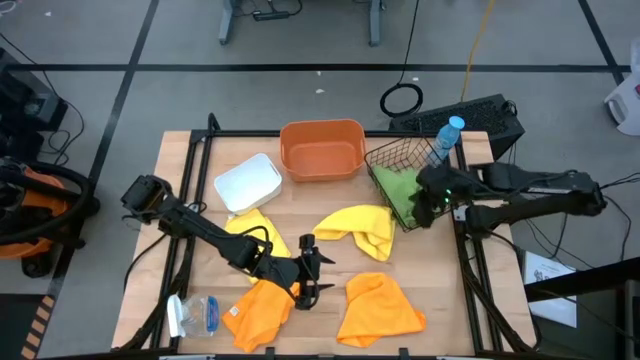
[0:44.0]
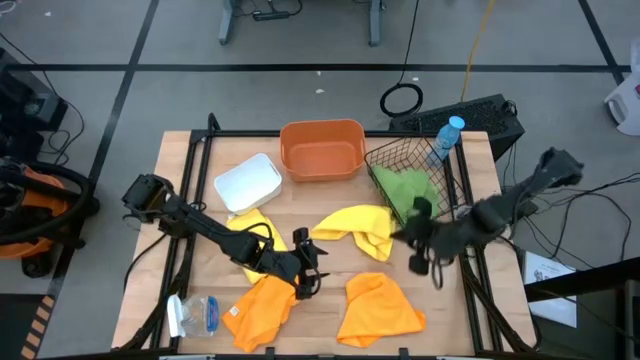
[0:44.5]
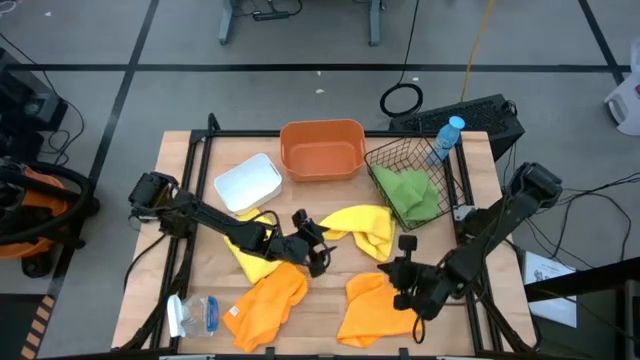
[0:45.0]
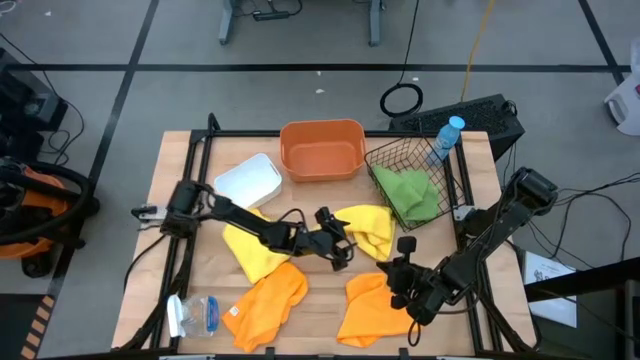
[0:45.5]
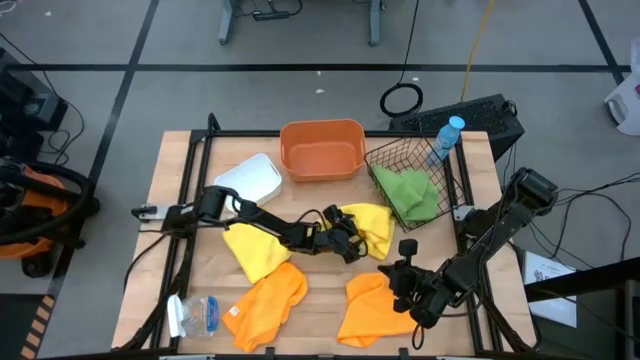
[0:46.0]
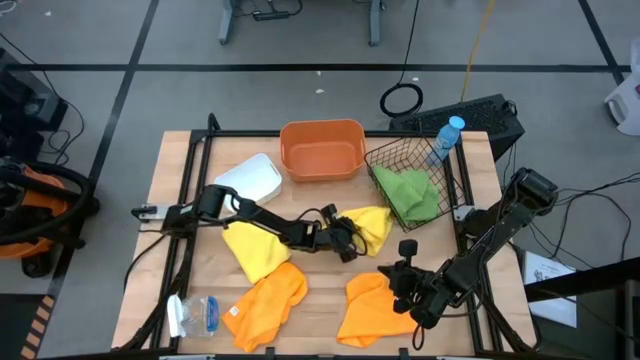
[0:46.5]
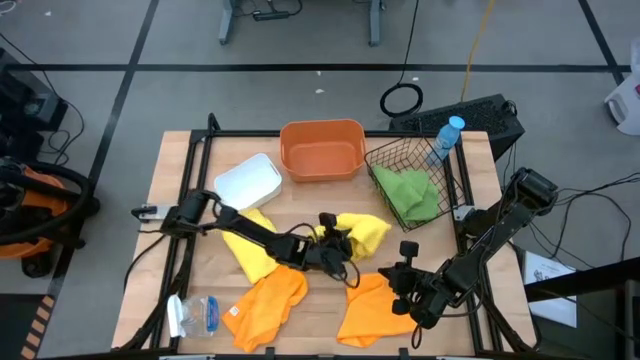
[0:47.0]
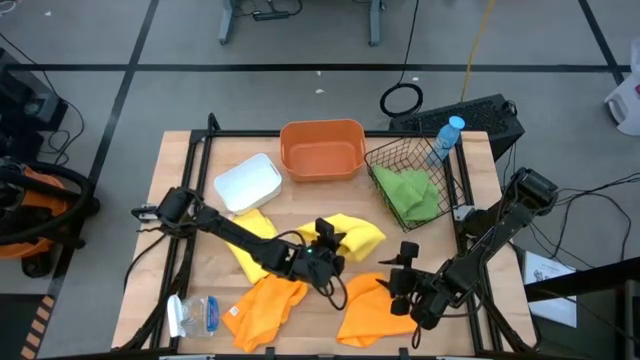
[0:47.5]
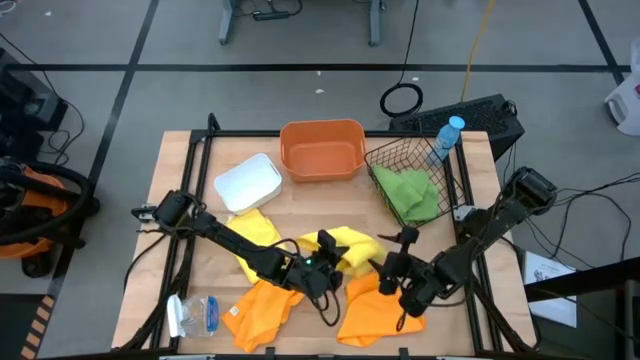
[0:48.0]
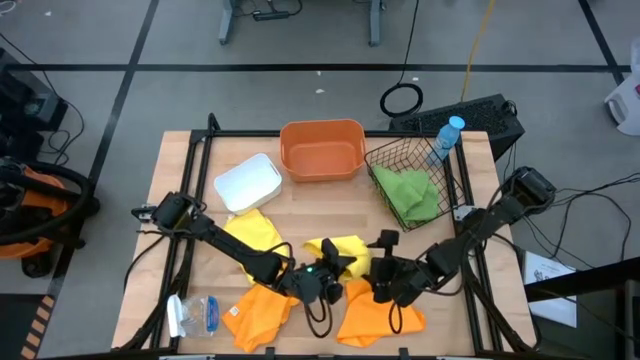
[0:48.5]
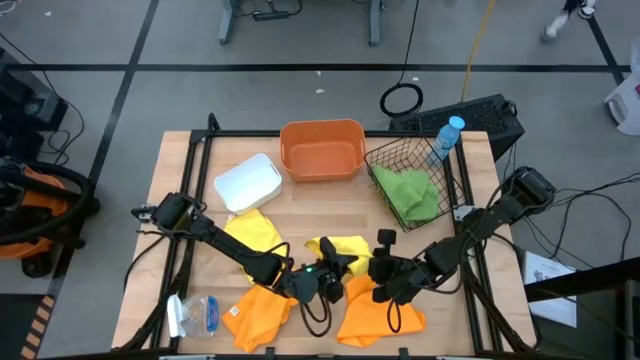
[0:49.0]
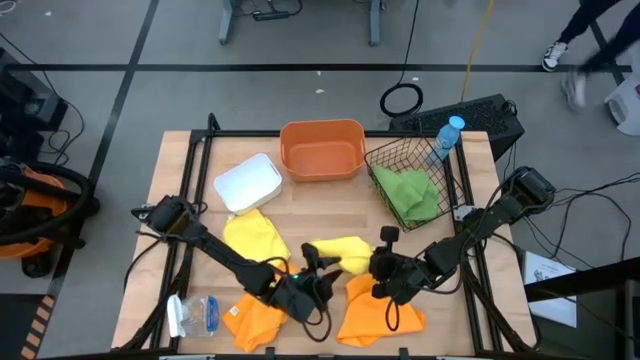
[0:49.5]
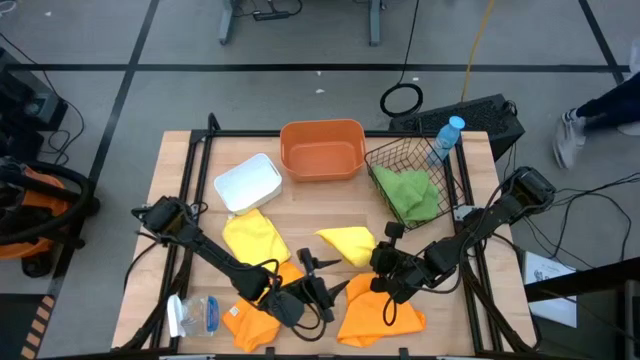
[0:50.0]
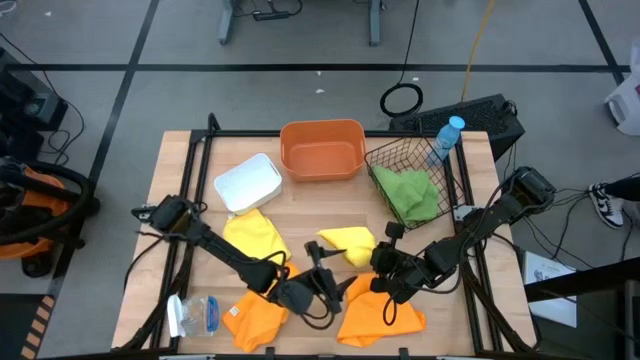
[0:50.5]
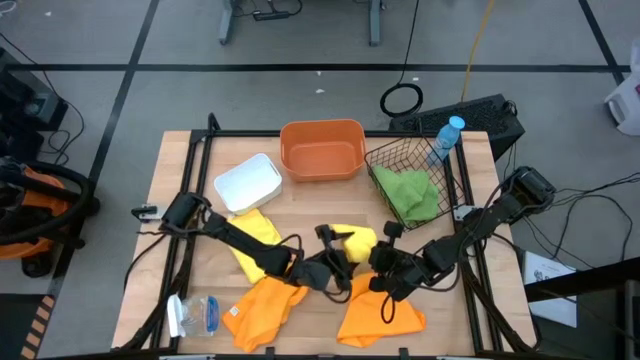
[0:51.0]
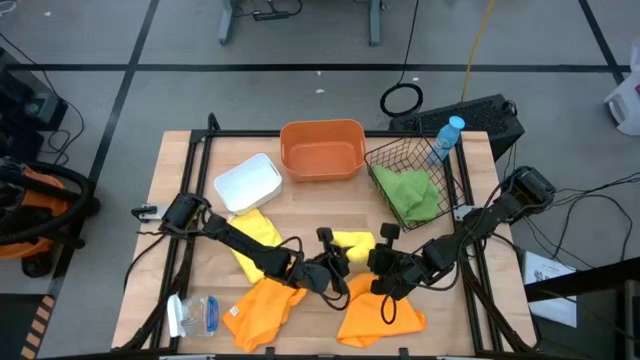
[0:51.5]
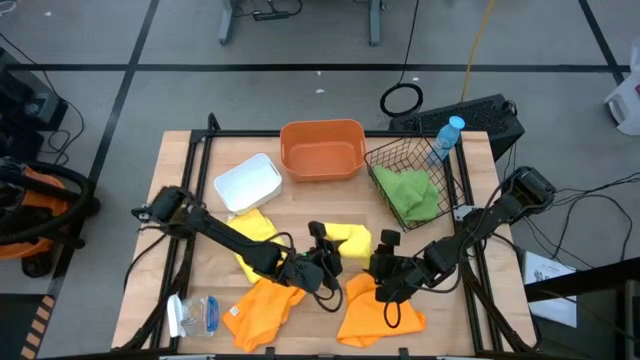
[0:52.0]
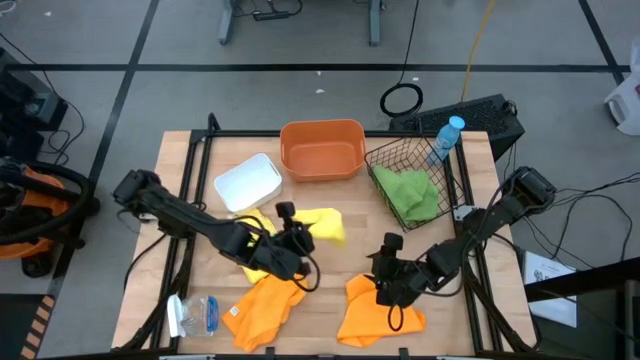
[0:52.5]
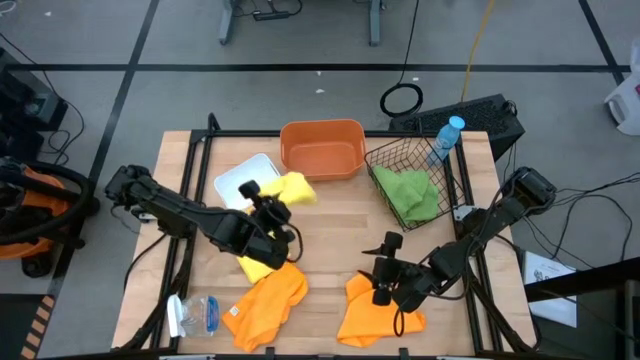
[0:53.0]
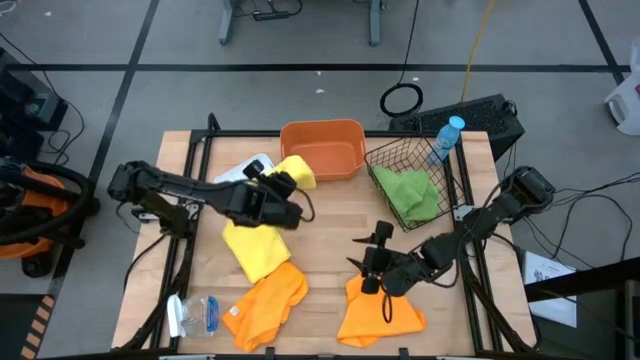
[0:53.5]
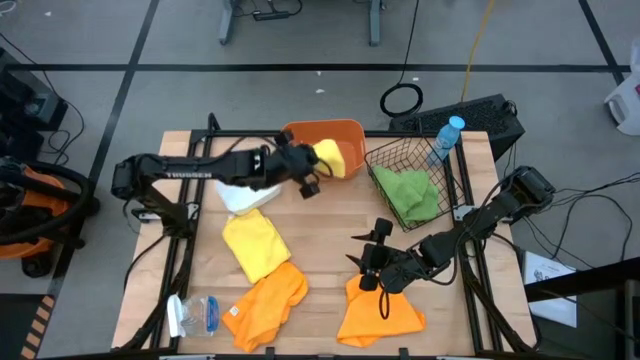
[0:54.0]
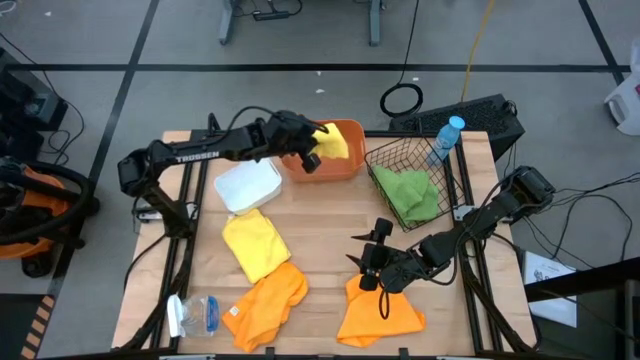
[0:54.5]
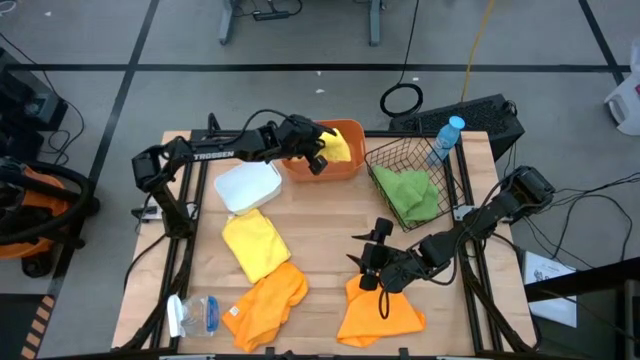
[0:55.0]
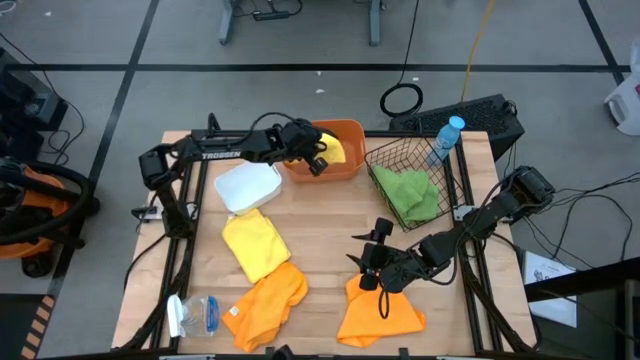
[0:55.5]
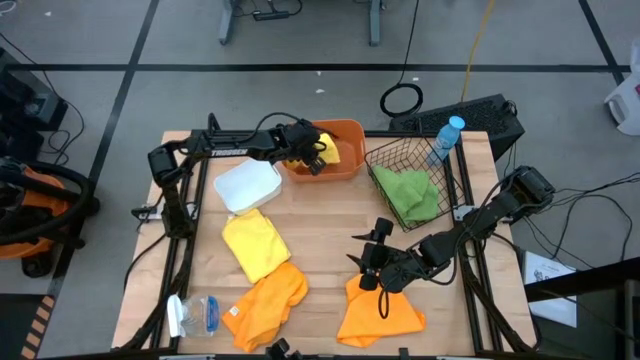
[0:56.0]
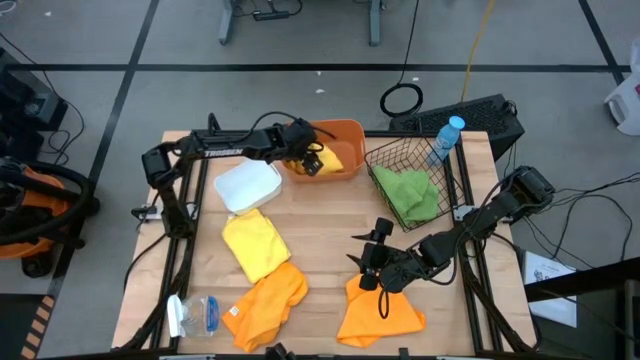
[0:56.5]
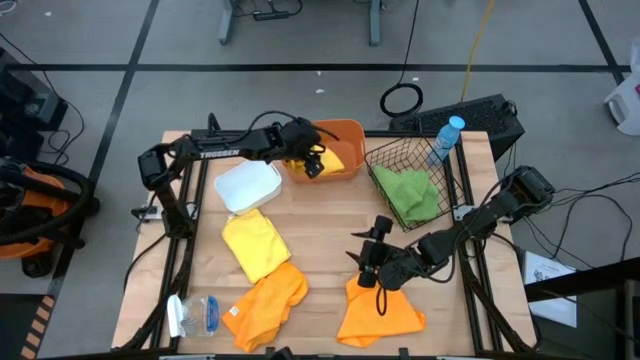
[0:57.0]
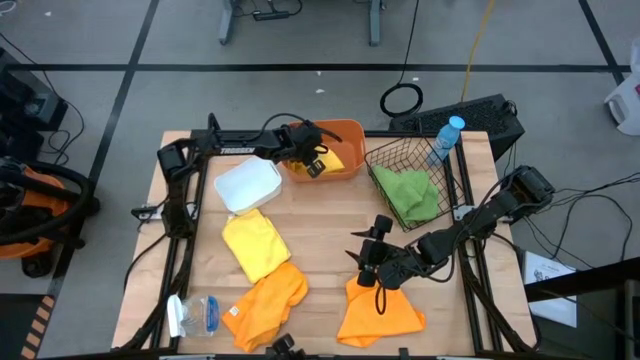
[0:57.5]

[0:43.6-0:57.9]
Task: Sort microfiber towel by color & place in baskets
Put the right yellow towel into the orange bin

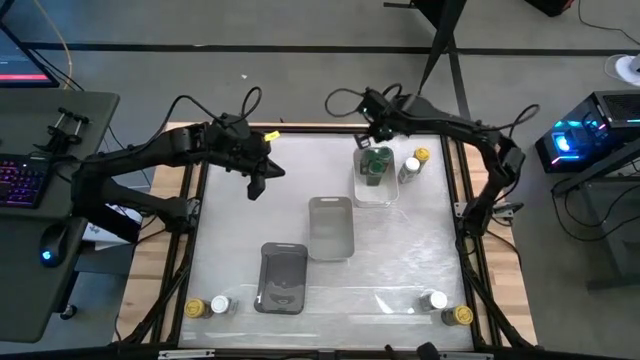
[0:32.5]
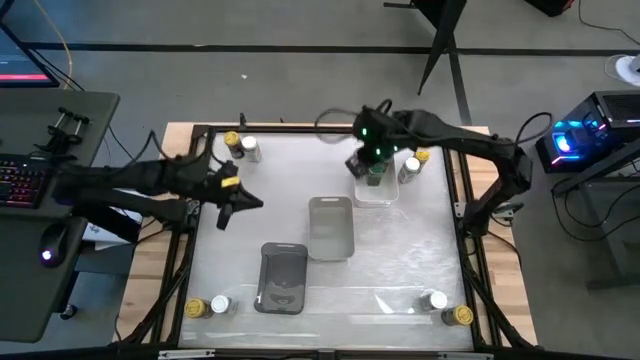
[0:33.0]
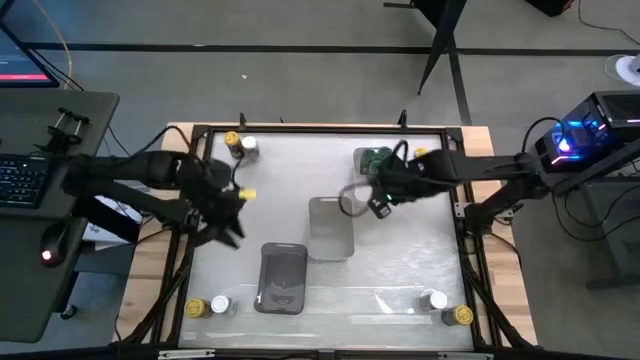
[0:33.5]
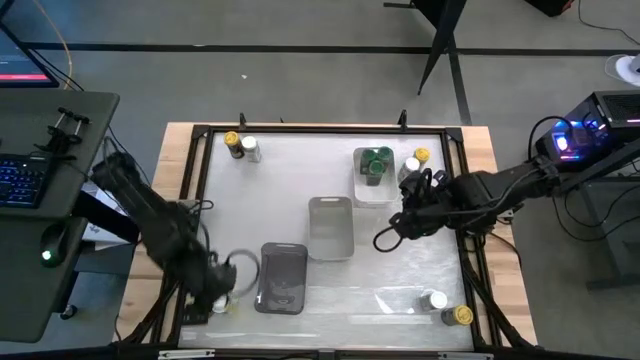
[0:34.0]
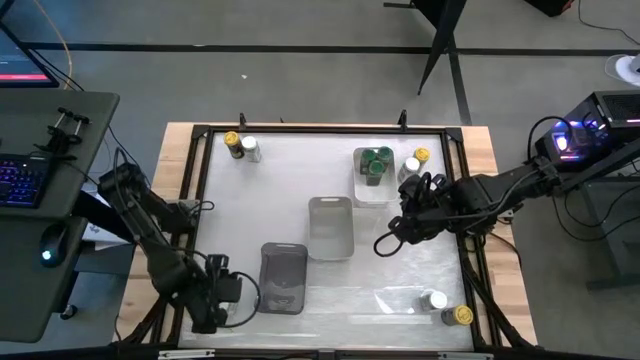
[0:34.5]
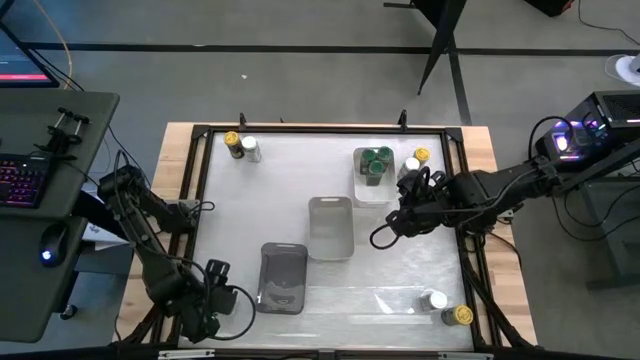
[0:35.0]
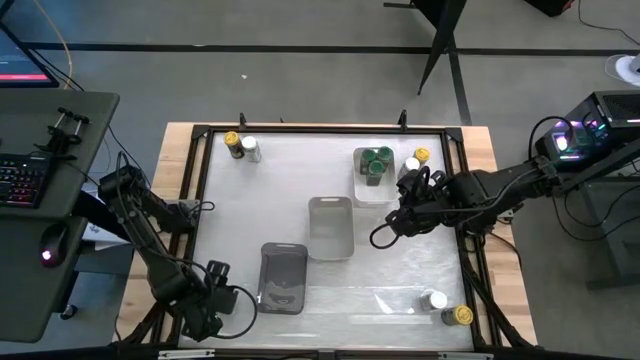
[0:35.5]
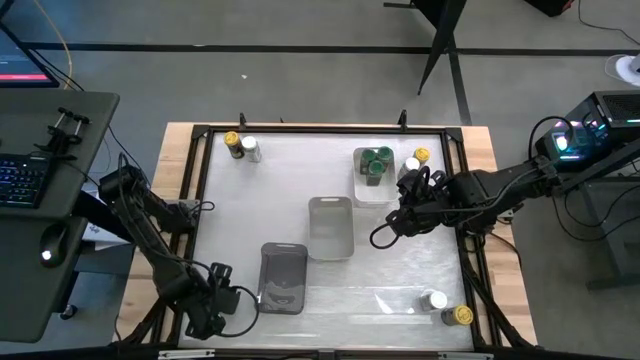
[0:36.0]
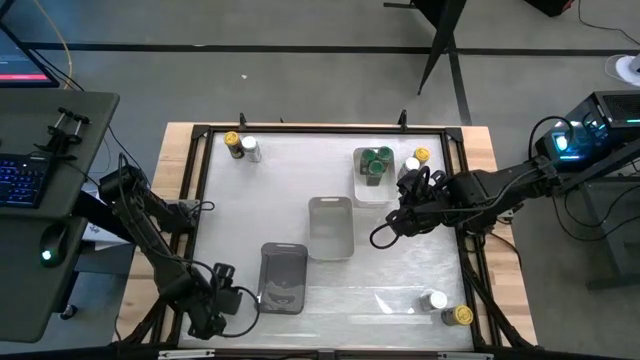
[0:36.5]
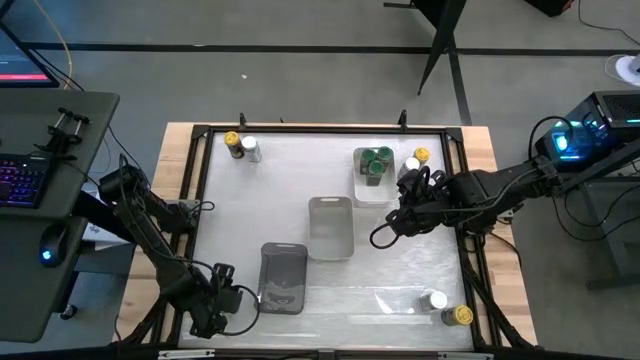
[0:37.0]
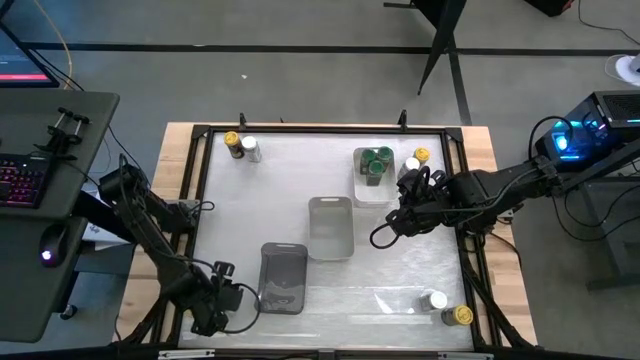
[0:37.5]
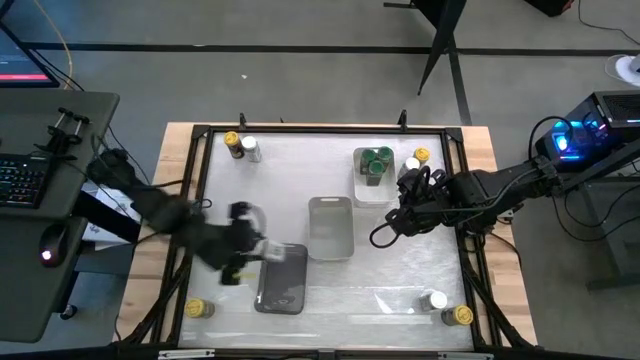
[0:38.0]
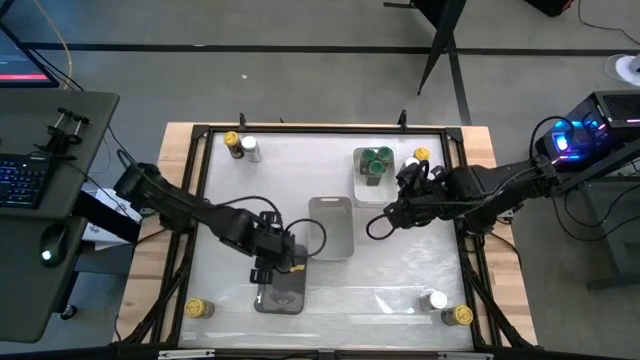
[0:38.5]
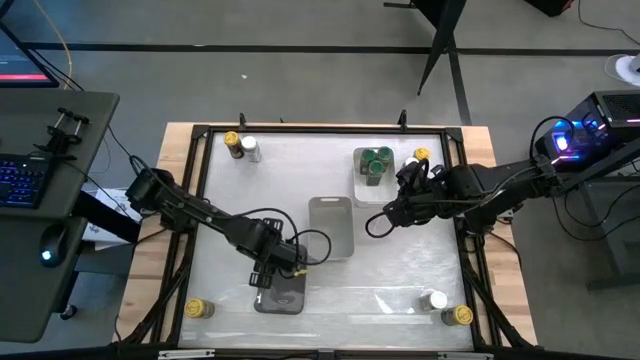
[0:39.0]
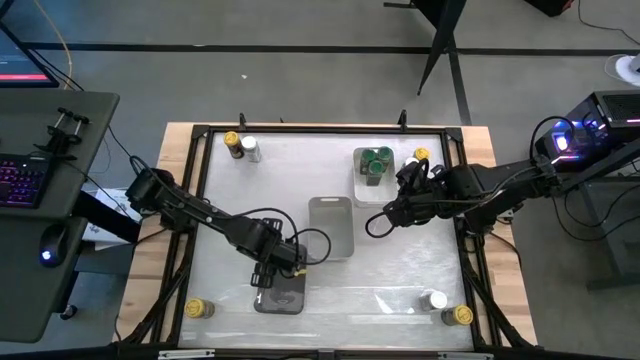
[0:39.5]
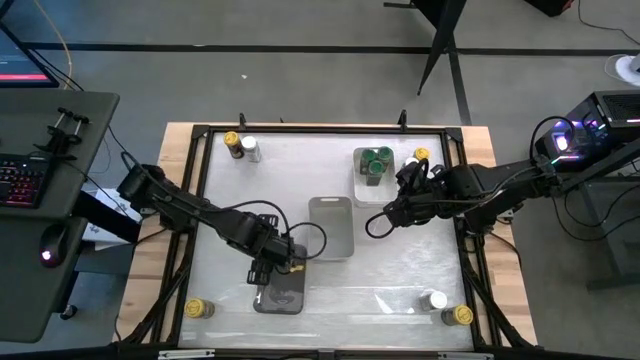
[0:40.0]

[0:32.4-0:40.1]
Task: Sort spices by type
Put the white seasoning bottle into the black bin
